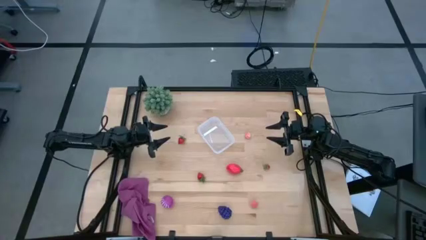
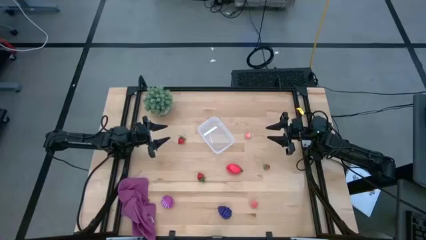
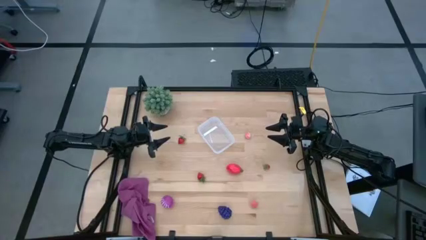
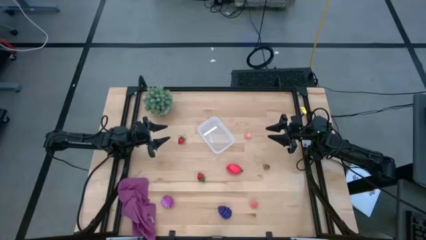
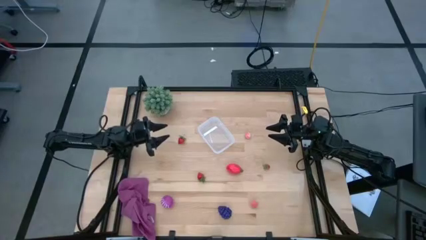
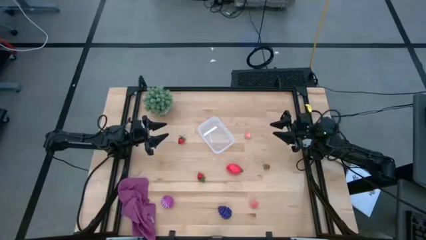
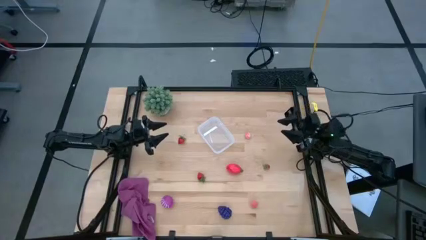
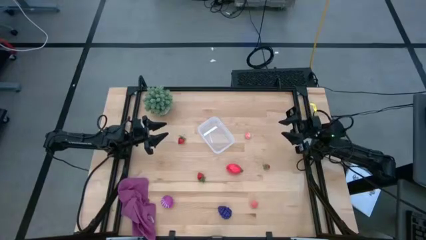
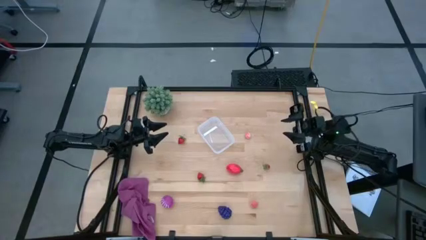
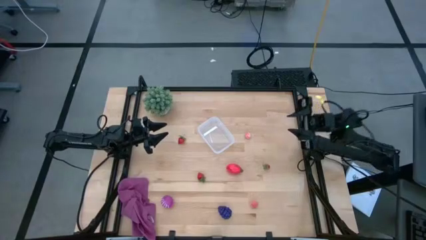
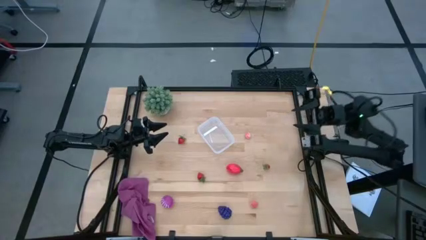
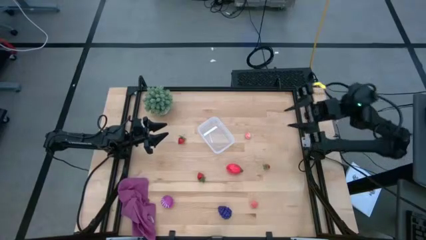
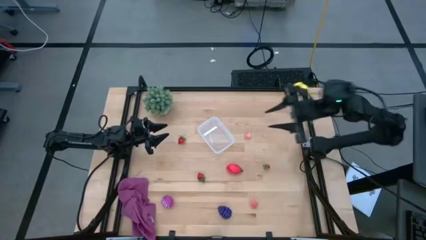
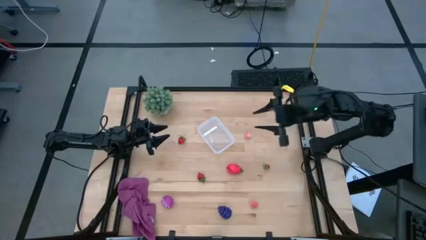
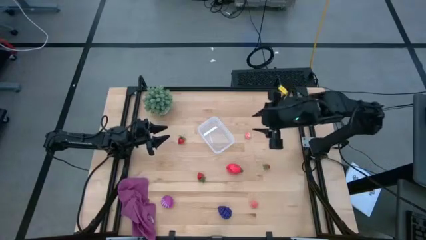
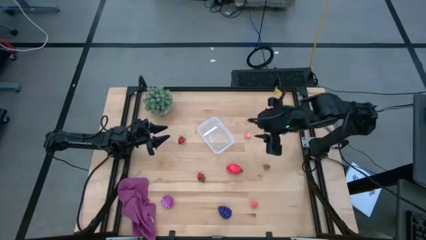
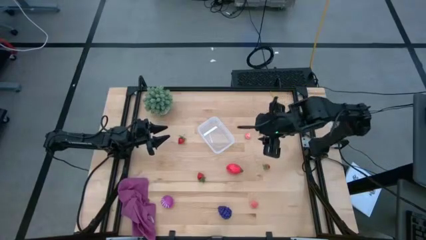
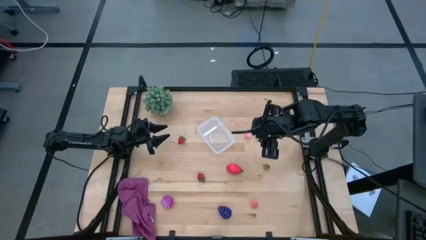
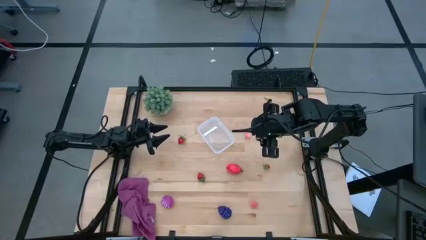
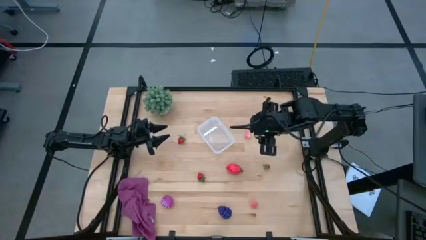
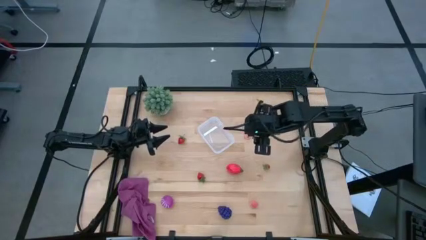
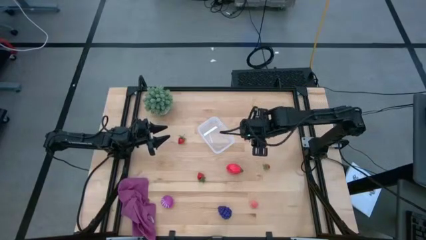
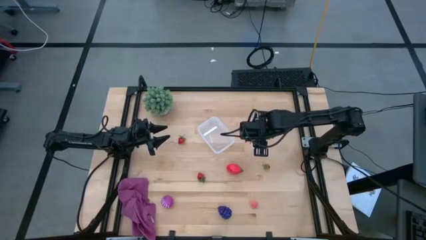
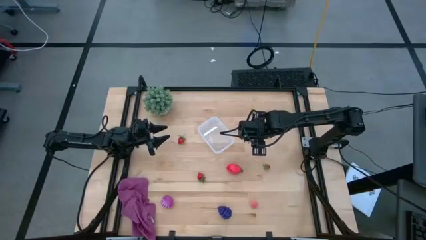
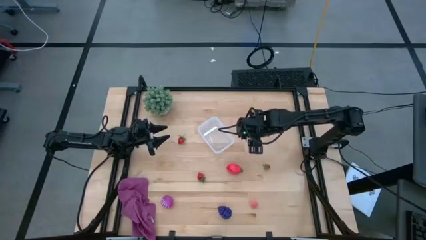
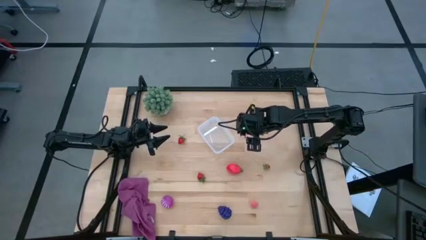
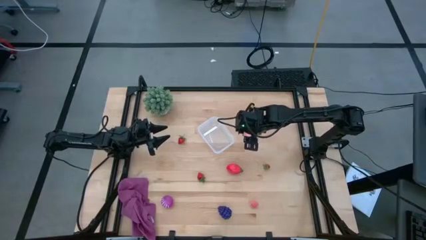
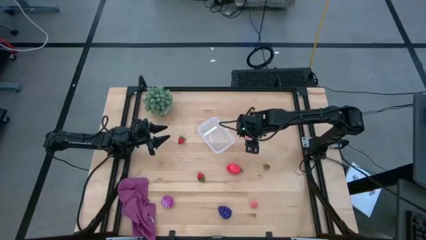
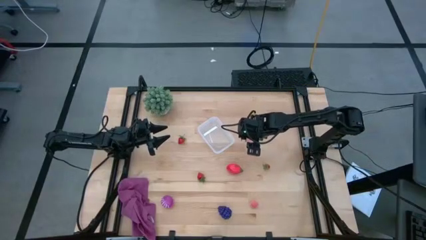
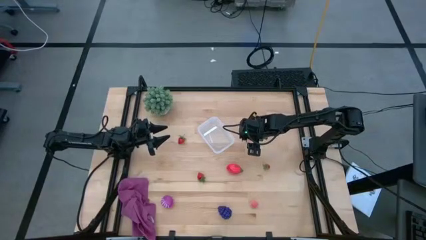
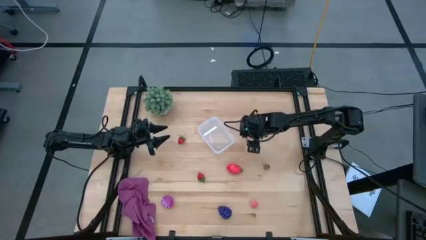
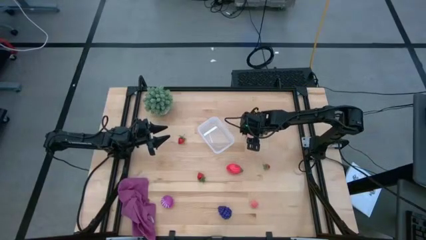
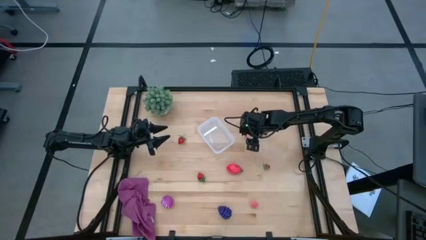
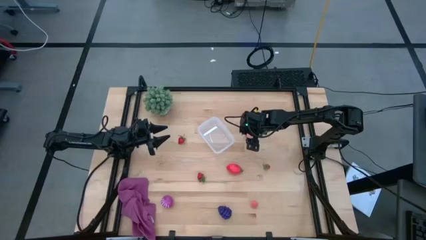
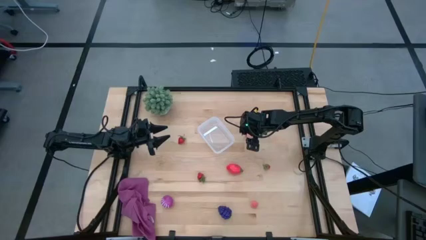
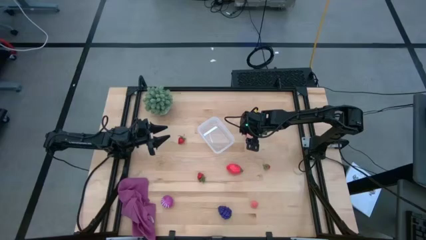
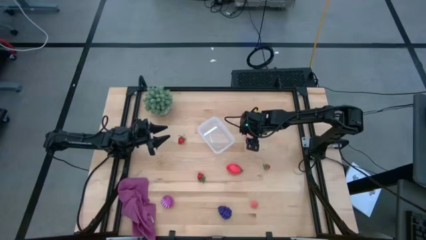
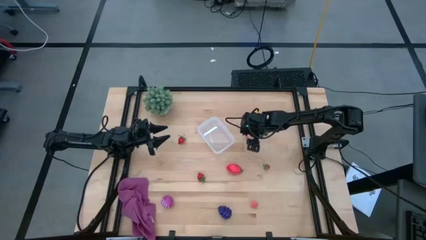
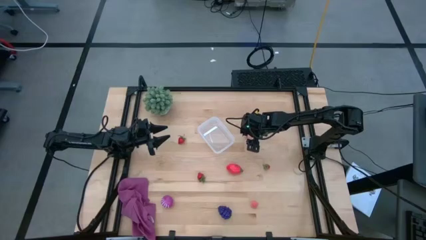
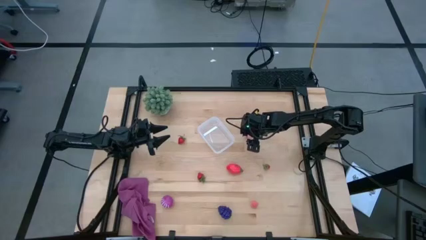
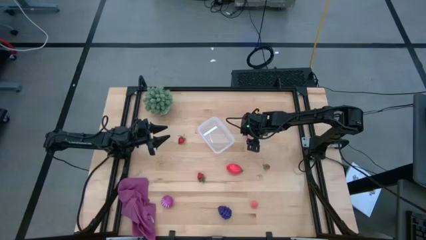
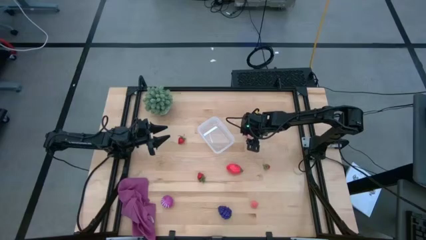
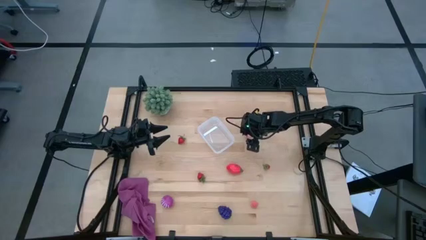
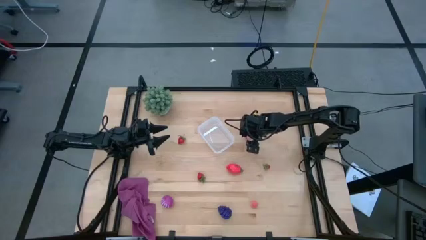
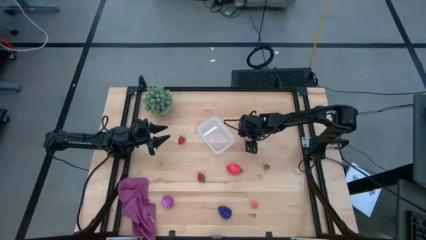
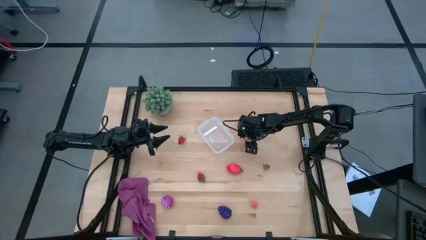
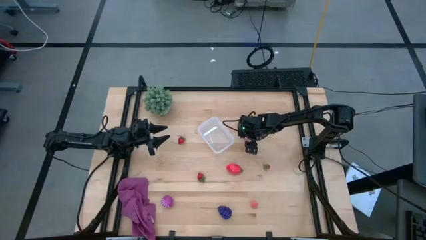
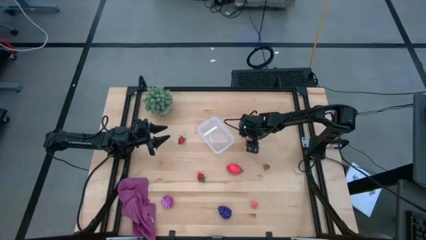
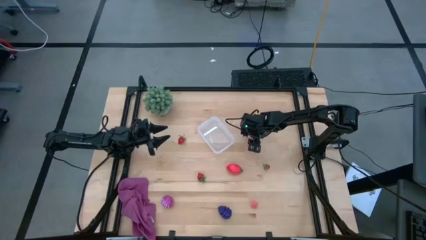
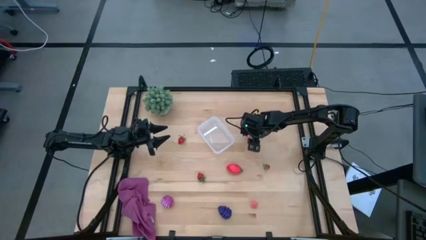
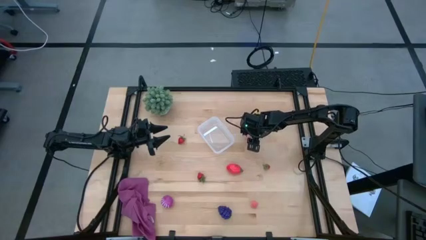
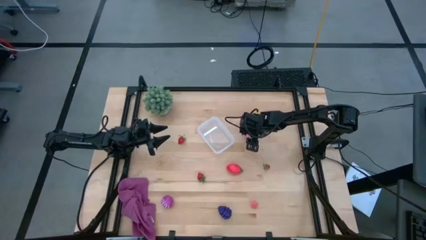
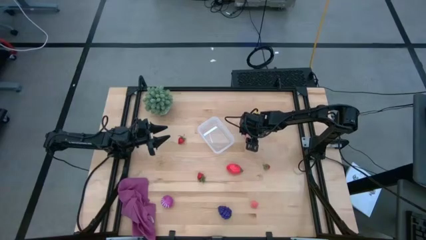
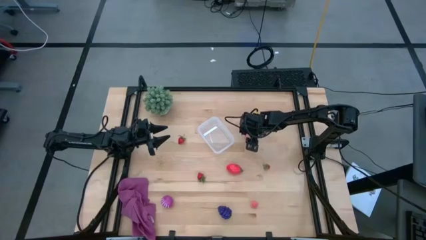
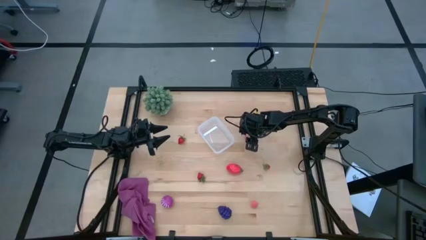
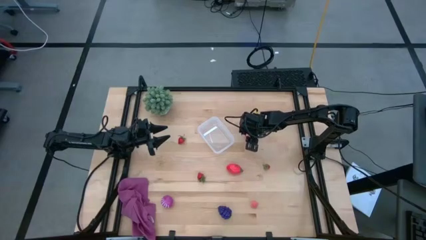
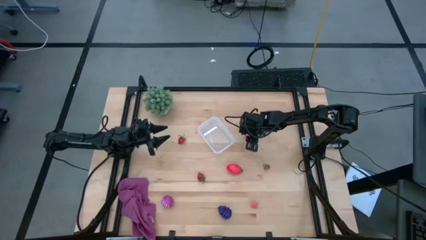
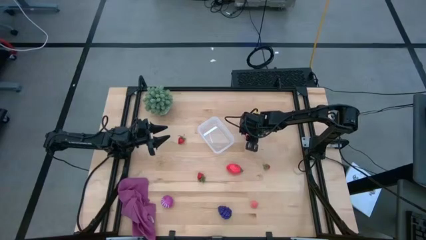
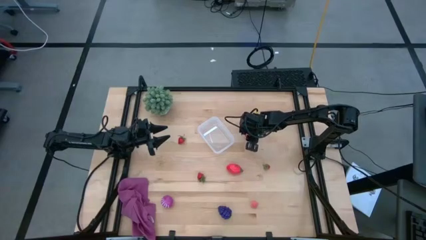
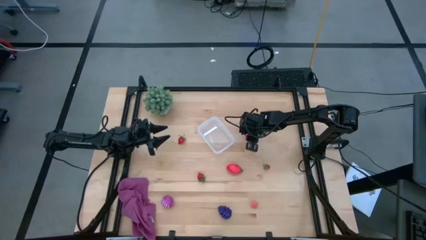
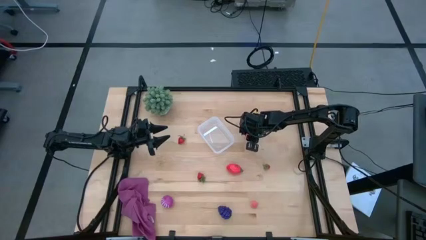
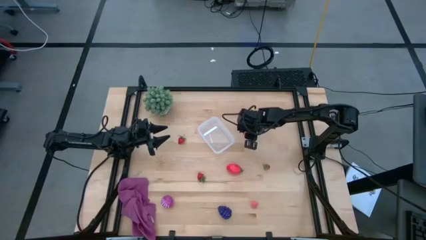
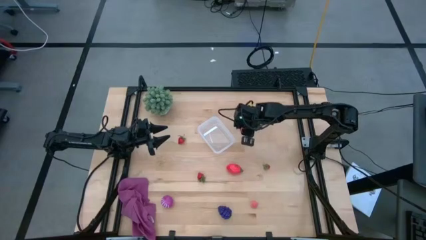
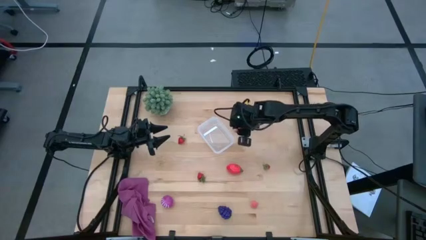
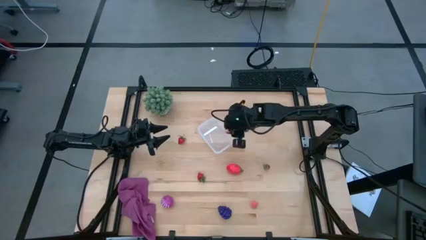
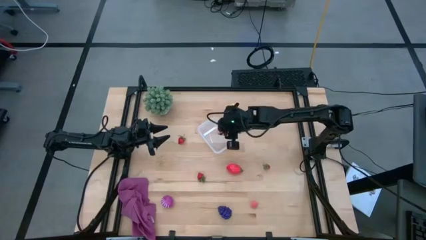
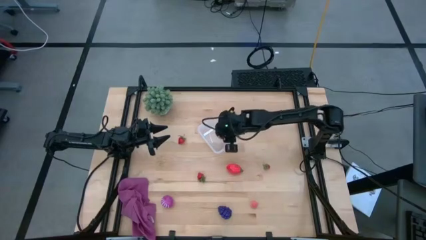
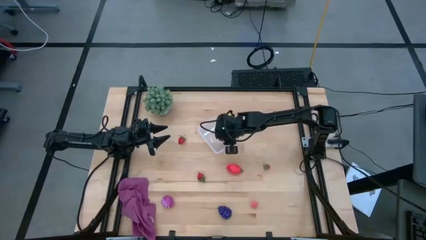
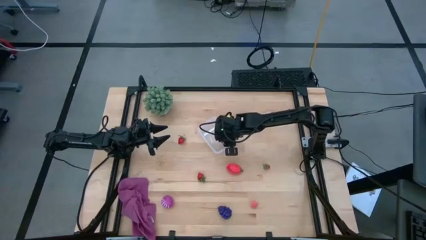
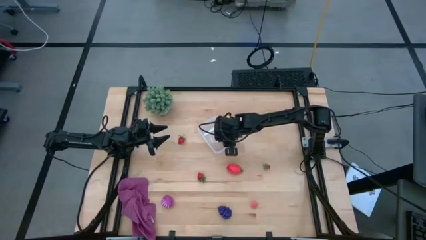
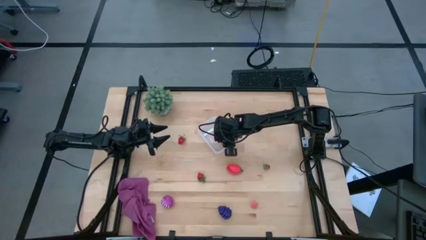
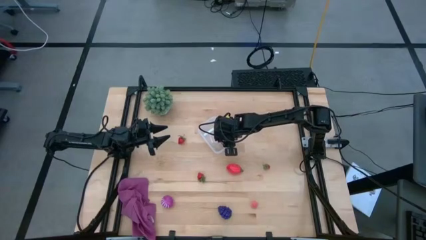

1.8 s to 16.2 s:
Task: Pick and placing Produce into tupperware
Put the top peach into the transparent bin
